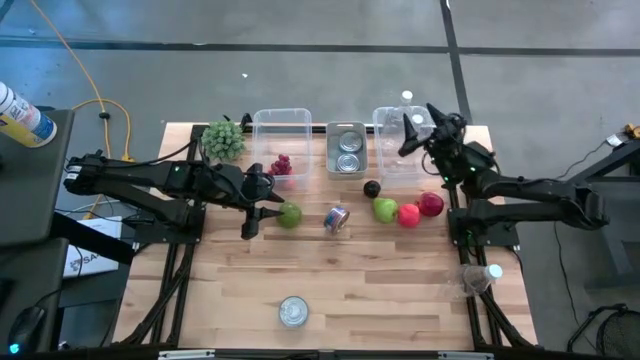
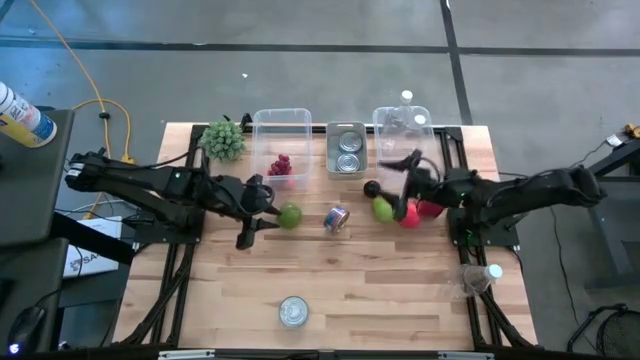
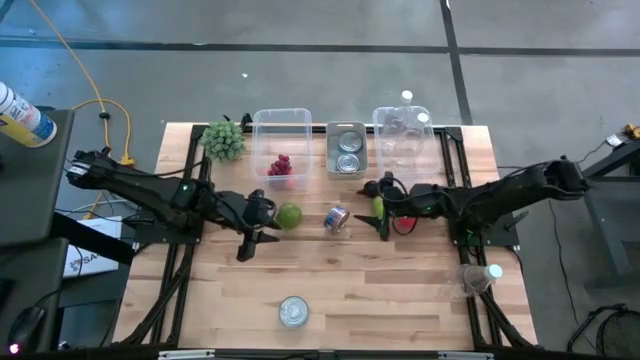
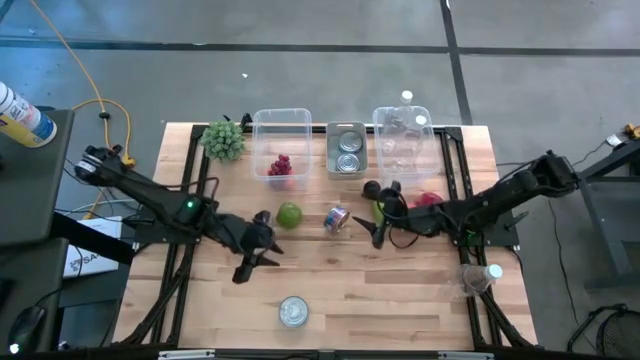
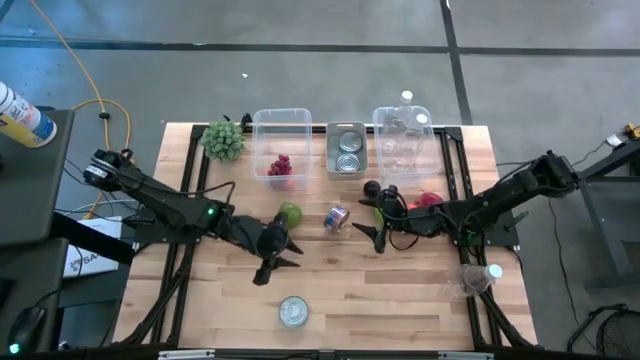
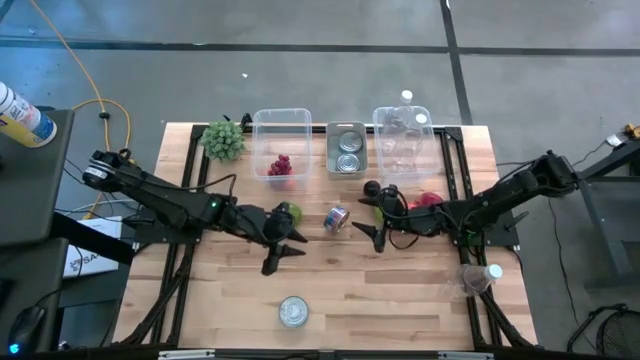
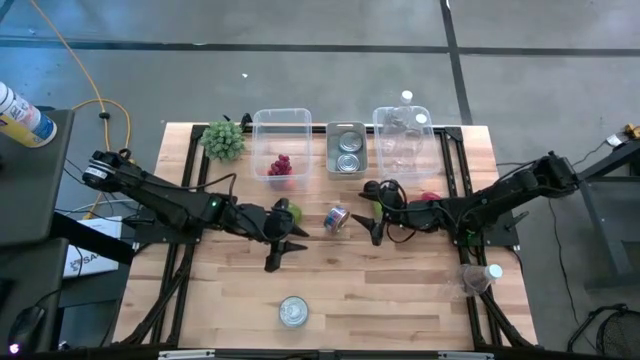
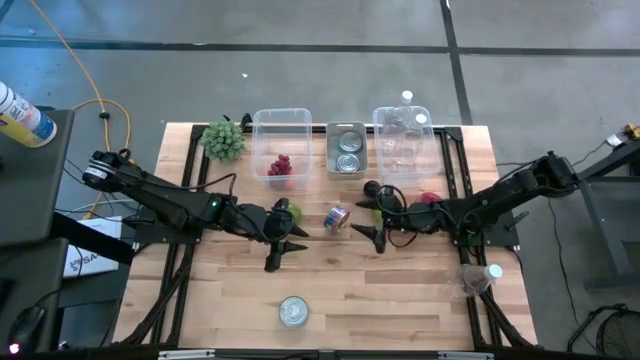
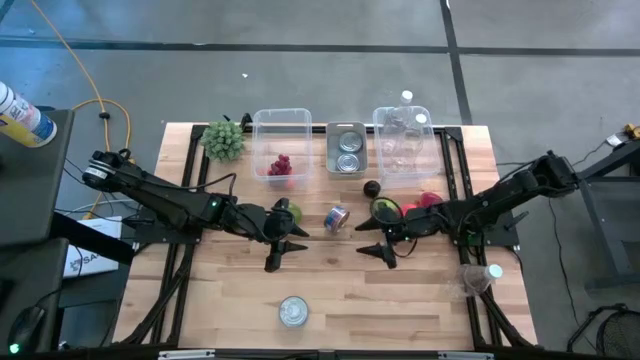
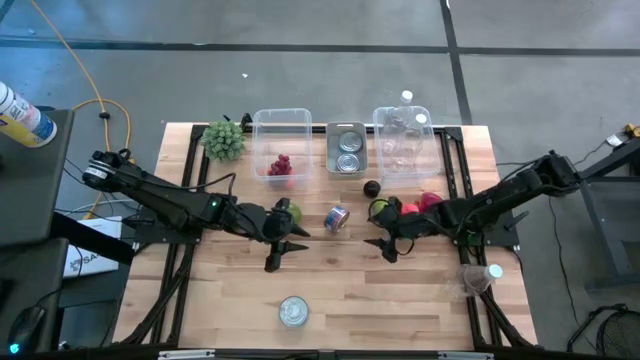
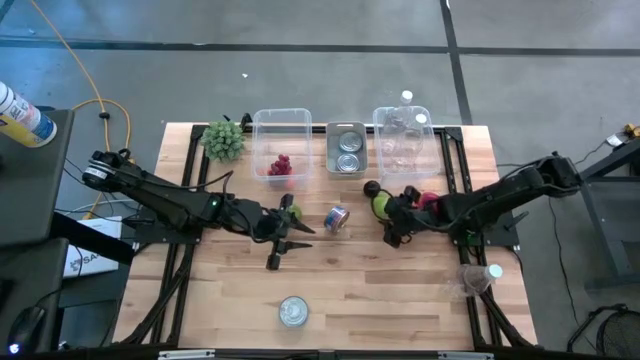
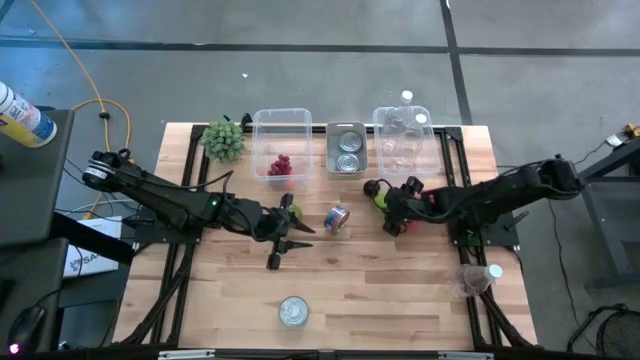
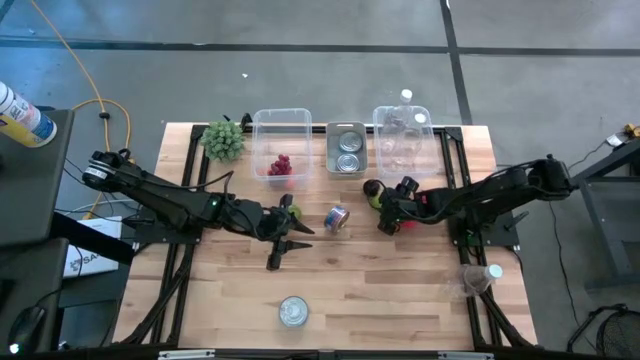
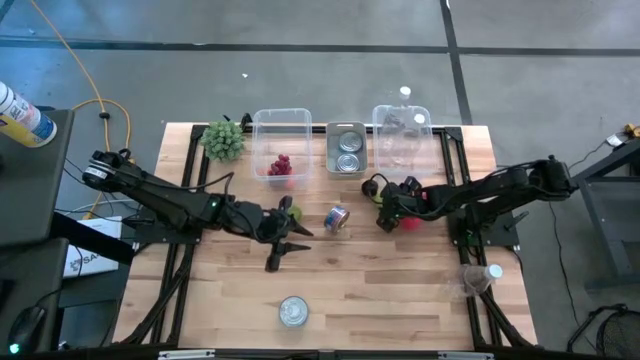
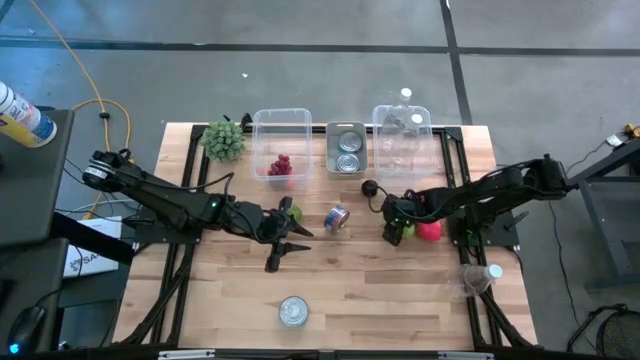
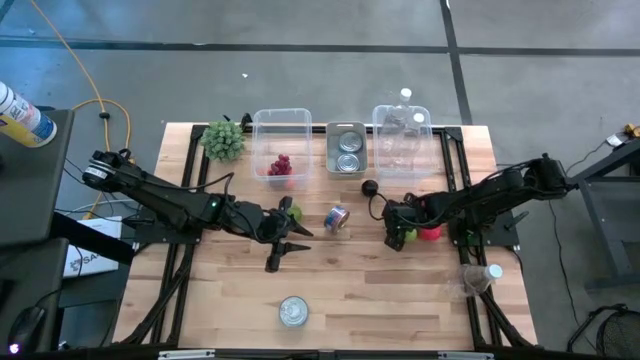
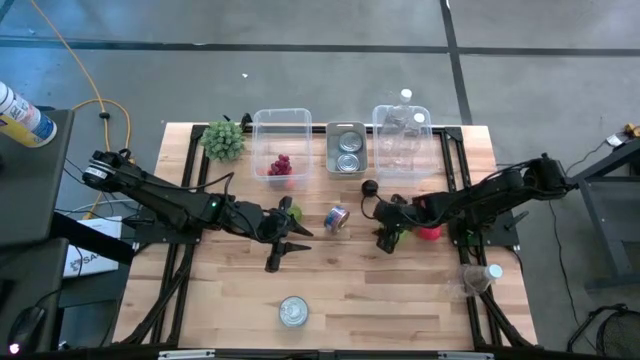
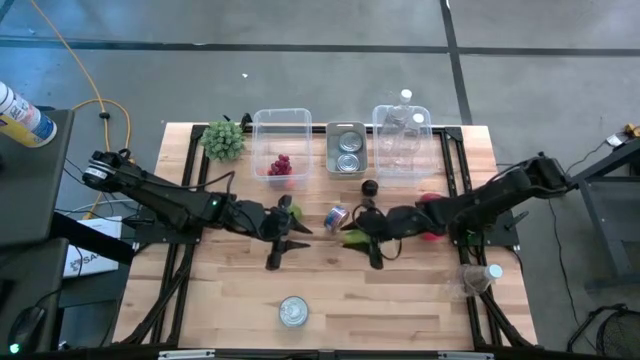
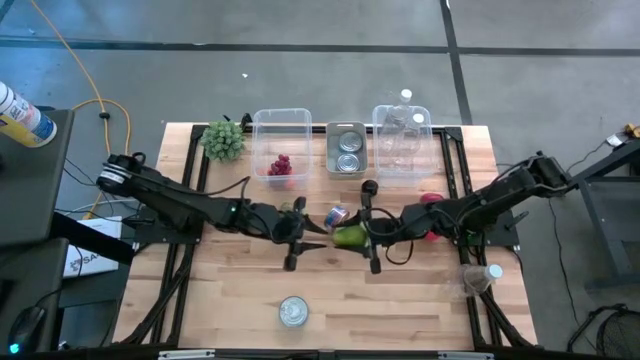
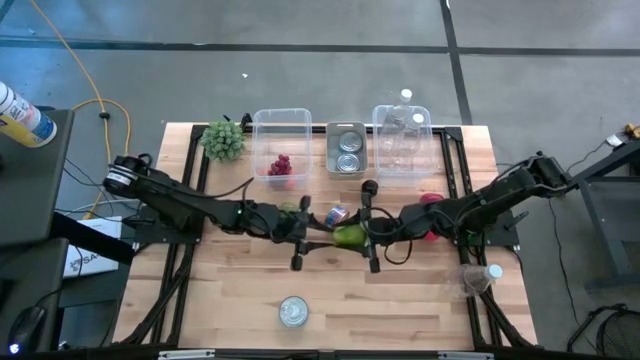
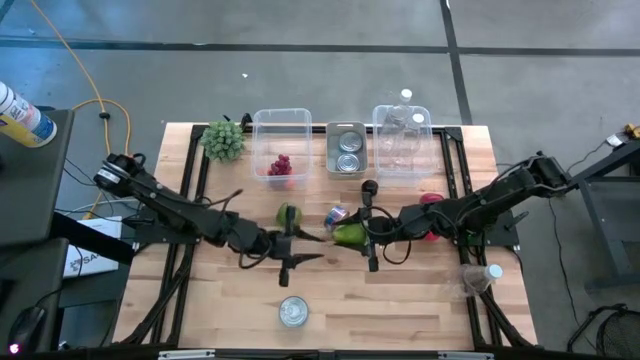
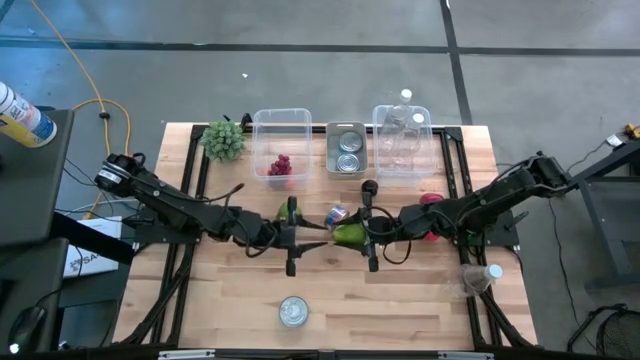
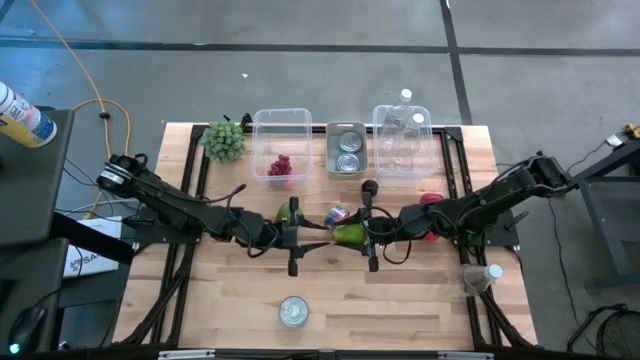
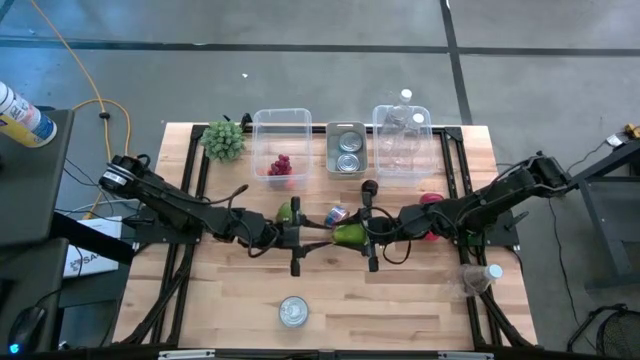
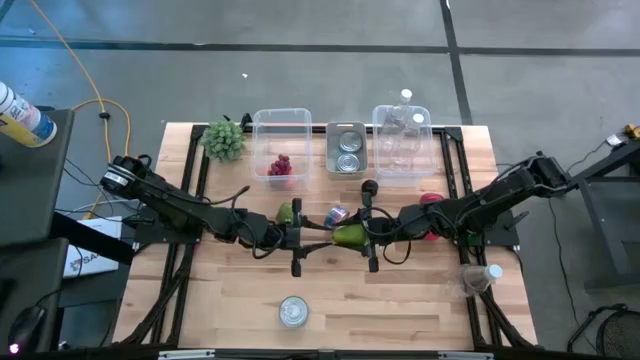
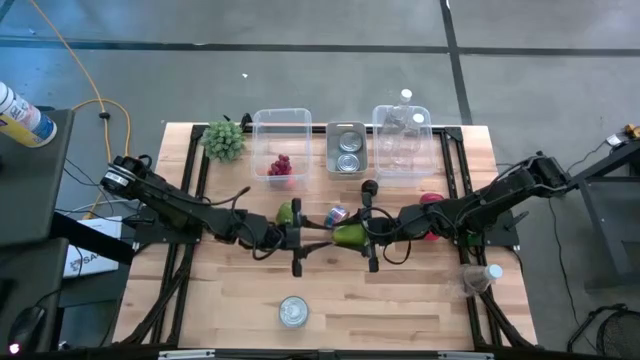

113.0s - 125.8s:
Task: Pick & Place Food Item
Put the pear into the left transparent bin

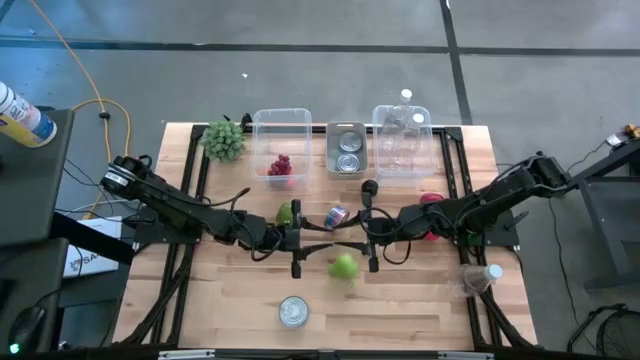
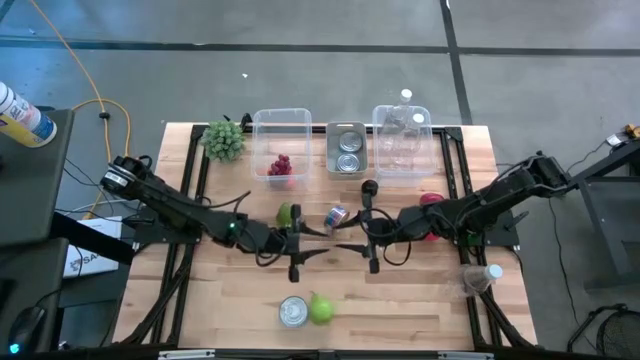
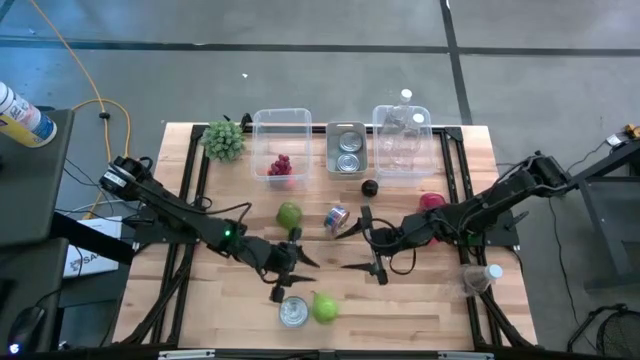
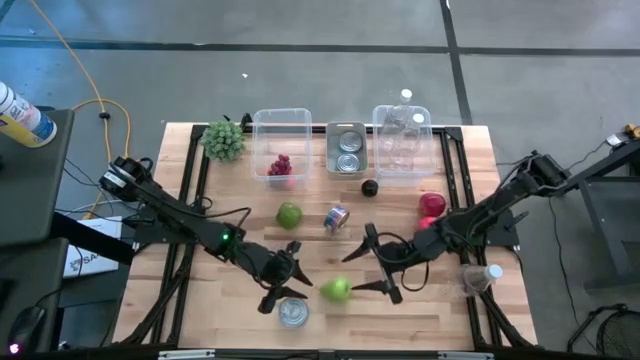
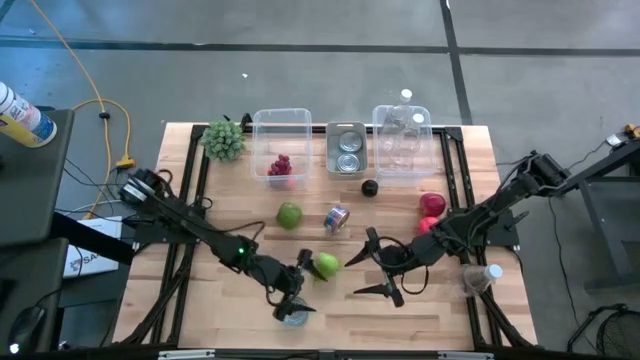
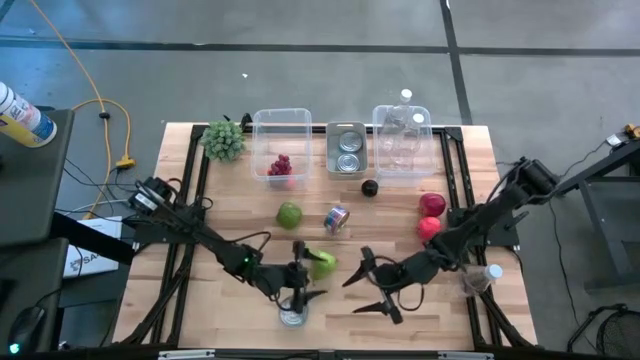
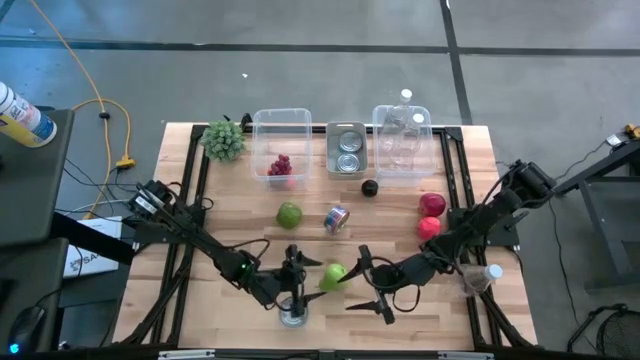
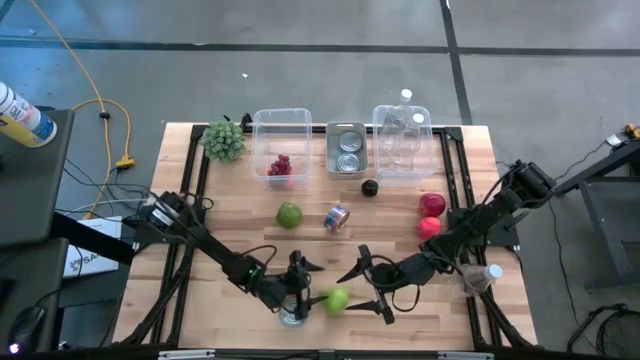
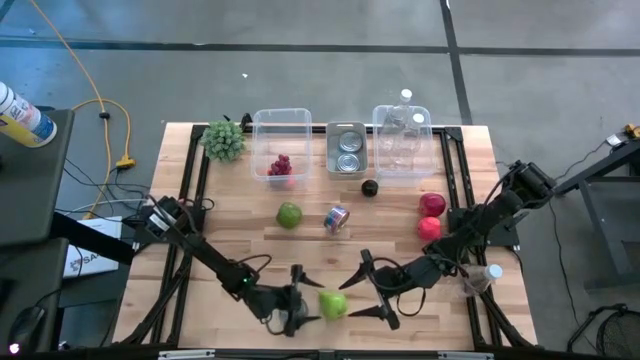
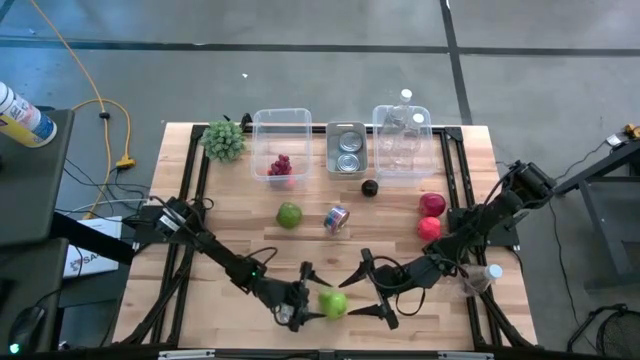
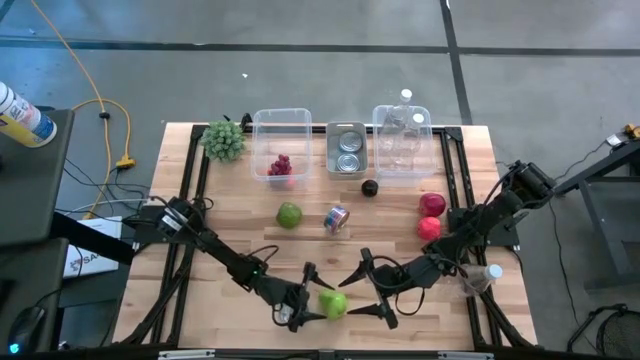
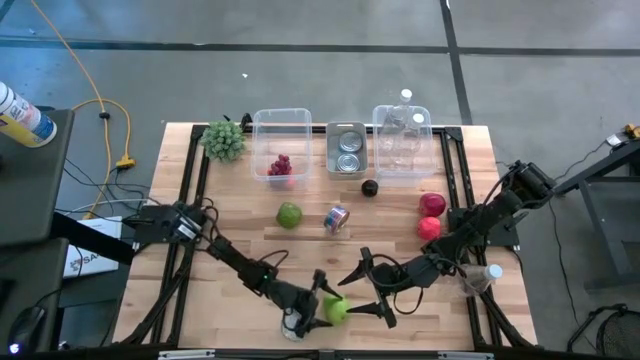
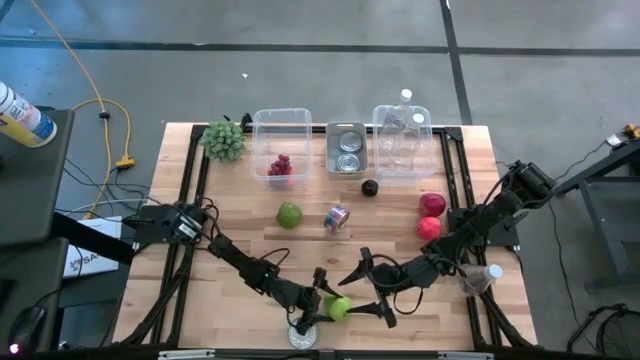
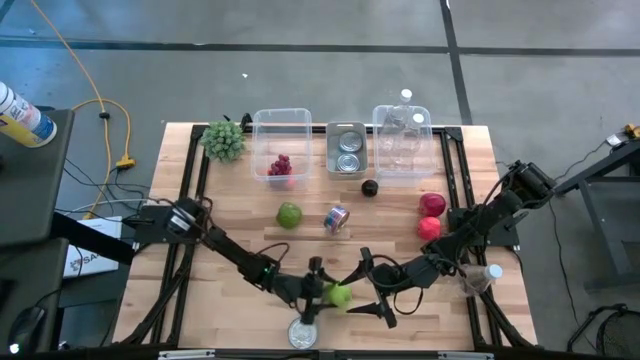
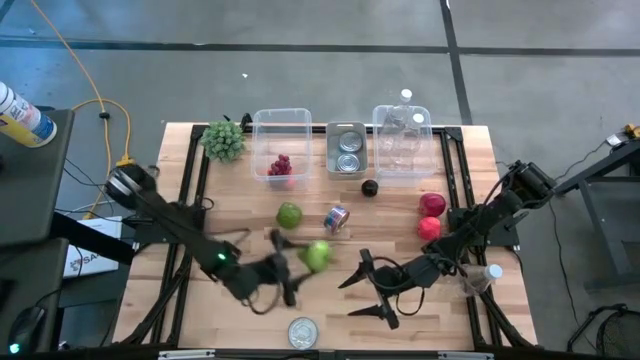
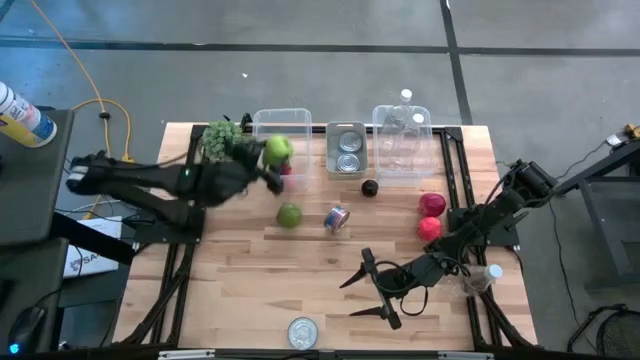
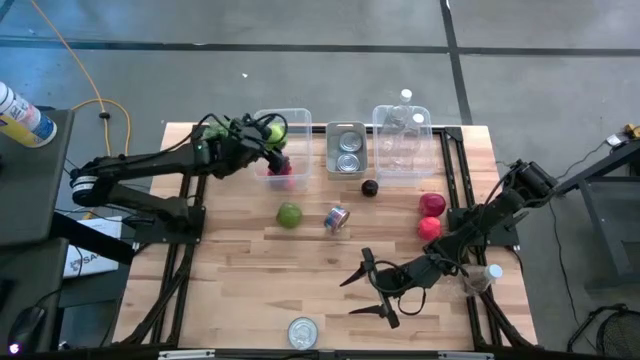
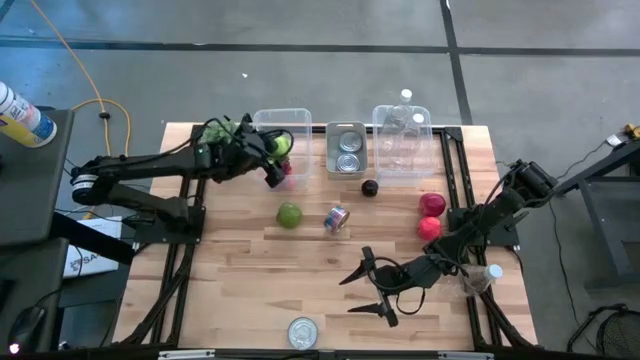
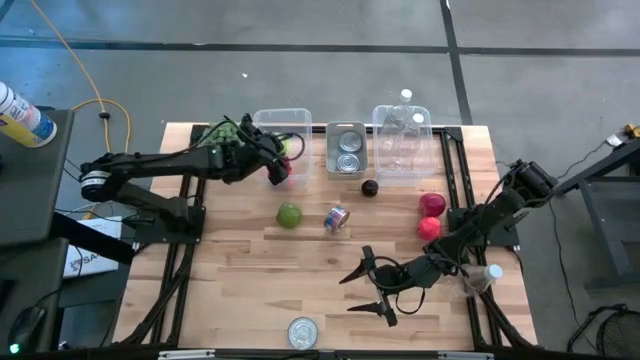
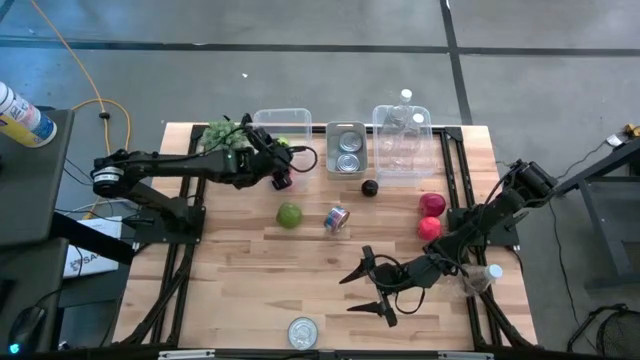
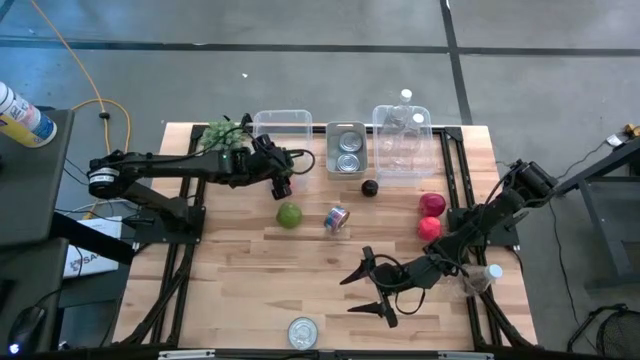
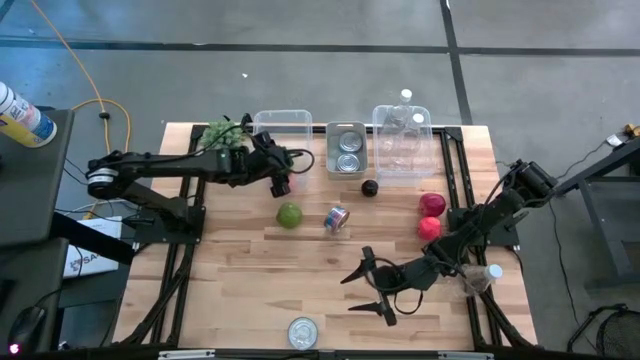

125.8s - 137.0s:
Put the pear into the left transparent bin
